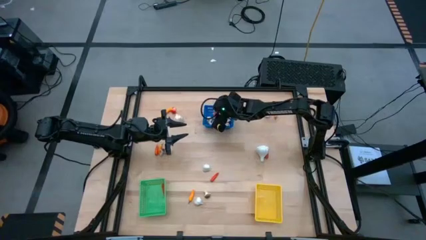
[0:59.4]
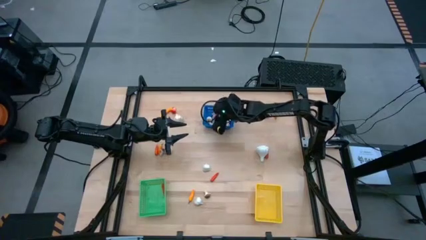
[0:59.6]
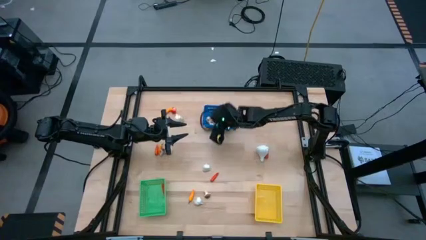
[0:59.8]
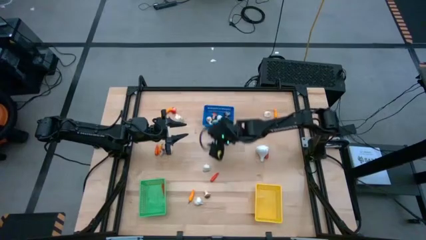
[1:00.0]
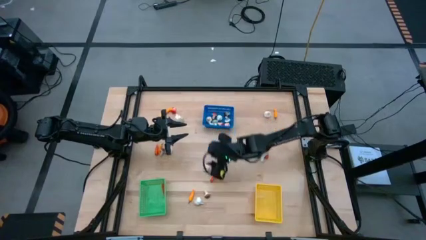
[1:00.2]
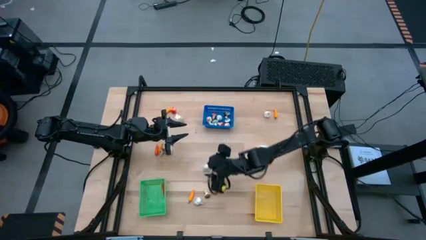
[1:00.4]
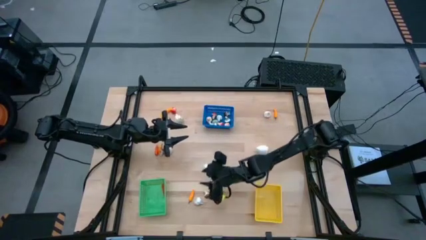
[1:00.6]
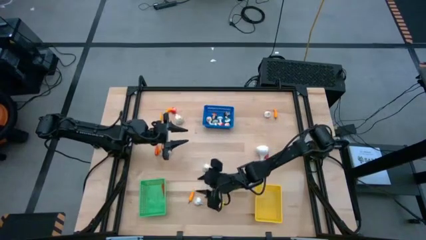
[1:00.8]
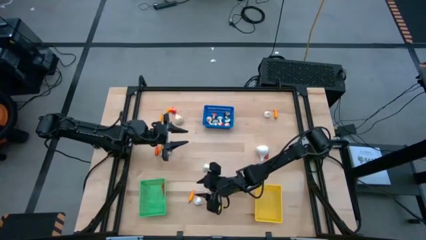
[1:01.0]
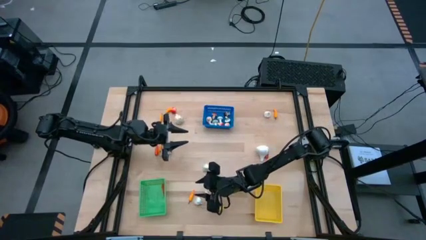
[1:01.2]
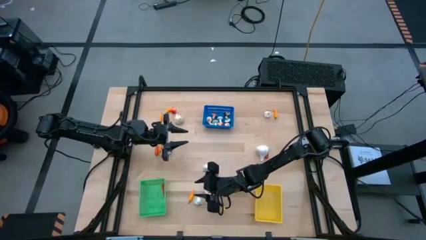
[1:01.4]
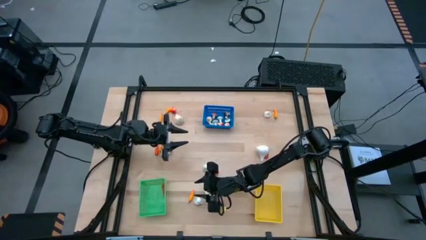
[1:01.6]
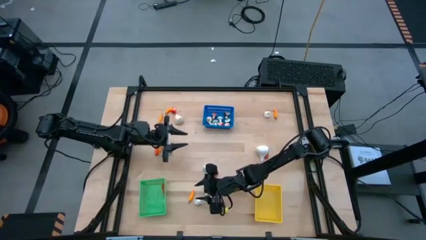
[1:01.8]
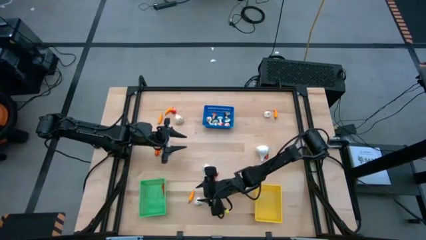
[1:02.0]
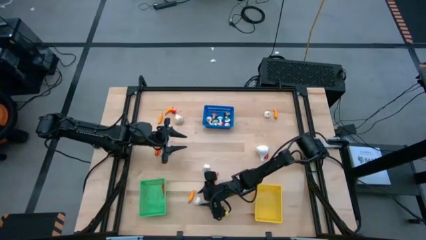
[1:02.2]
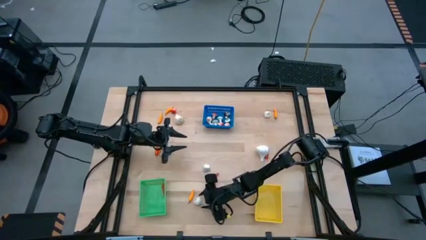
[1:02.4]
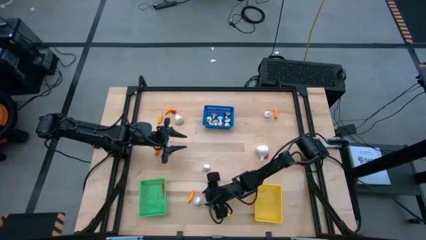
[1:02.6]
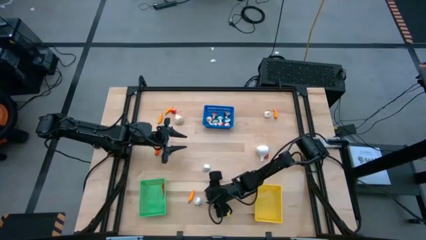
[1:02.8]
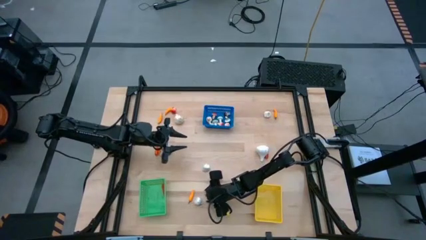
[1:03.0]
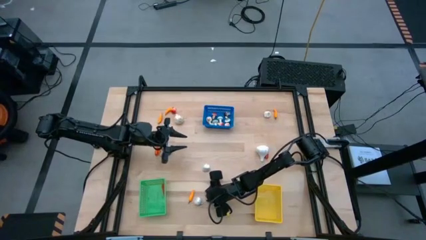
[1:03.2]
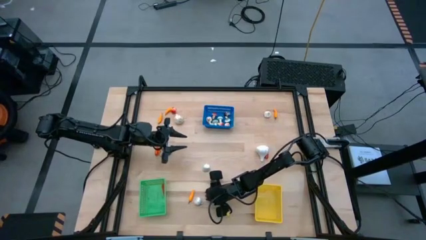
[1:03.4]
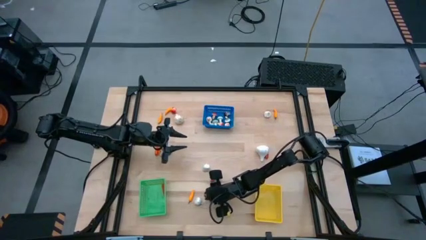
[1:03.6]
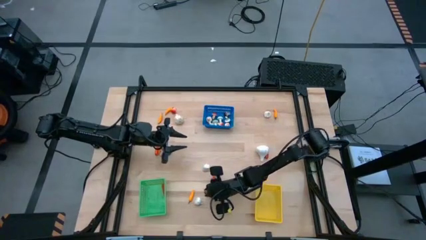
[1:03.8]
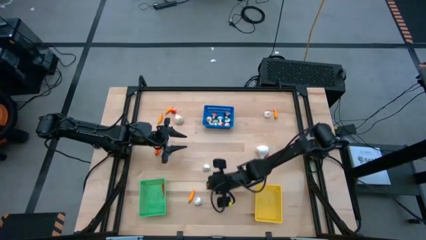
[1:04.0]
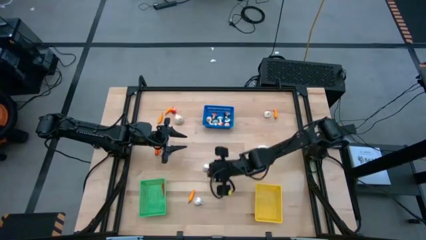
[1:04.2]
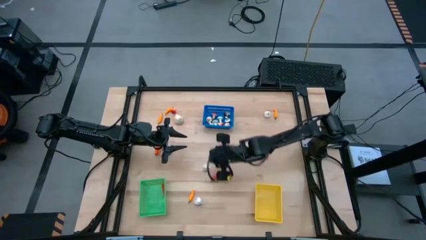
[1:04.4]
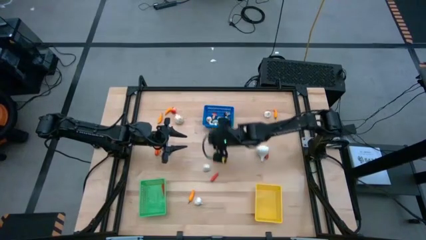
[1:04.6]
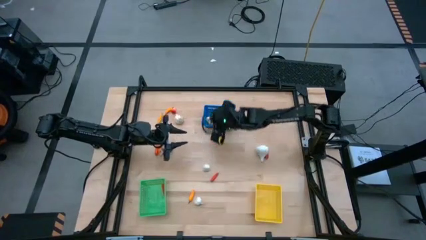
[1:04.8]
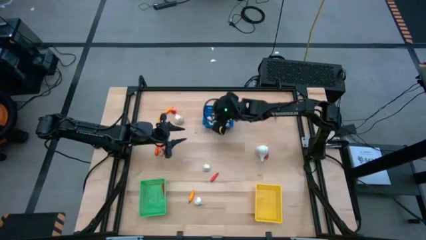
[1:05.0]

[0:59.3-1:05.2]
Task: Sort produce into baskets
Put then brown mushroom into the blue bin

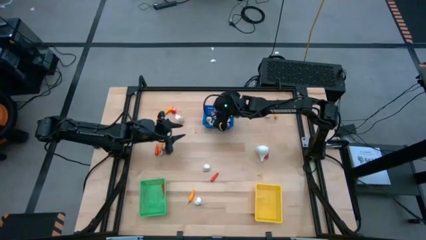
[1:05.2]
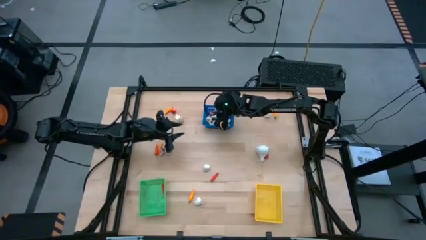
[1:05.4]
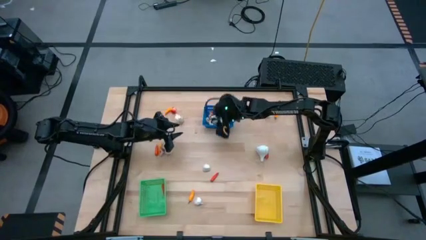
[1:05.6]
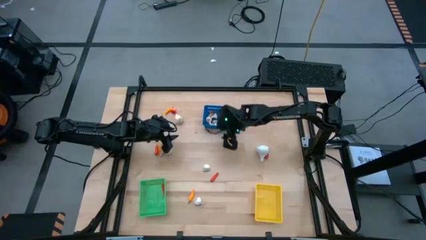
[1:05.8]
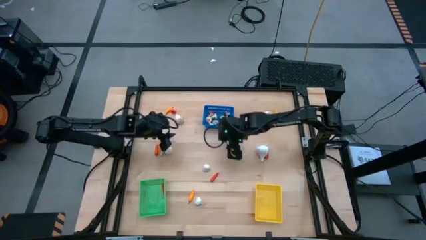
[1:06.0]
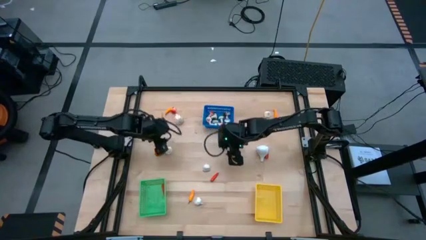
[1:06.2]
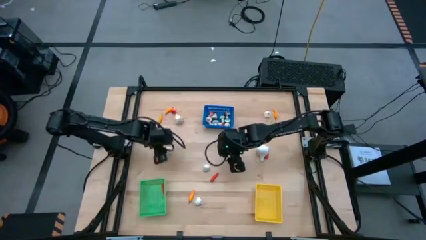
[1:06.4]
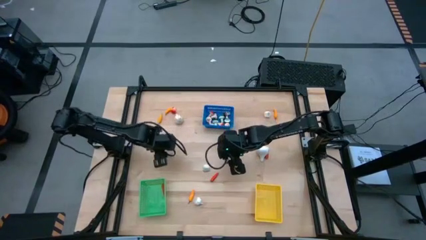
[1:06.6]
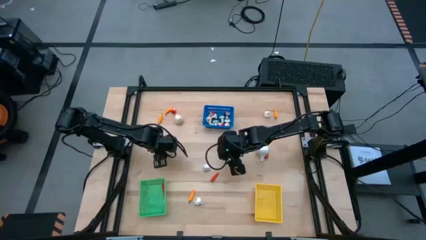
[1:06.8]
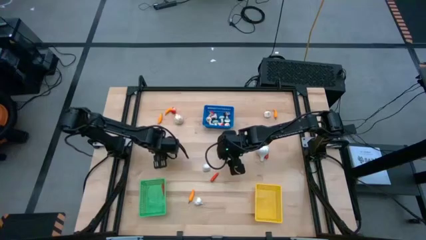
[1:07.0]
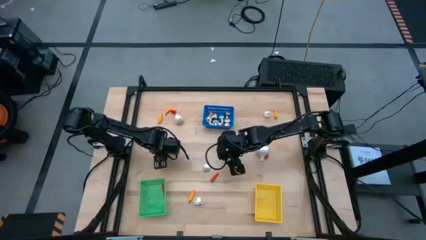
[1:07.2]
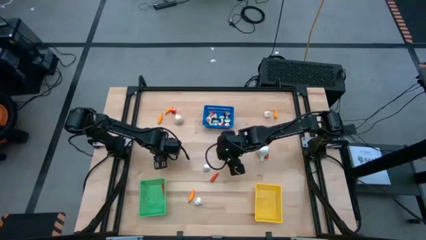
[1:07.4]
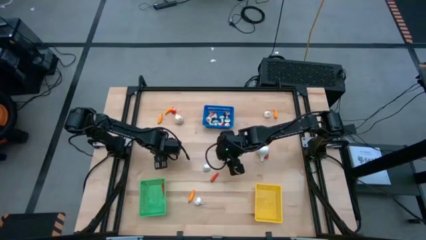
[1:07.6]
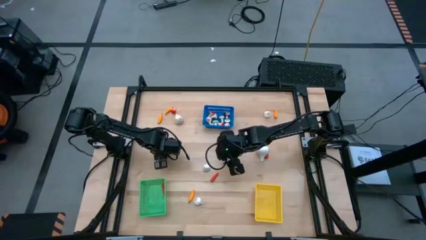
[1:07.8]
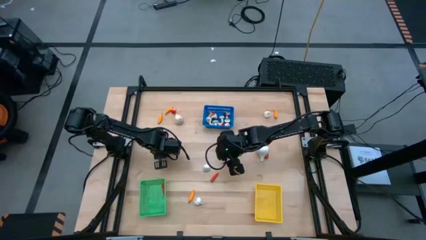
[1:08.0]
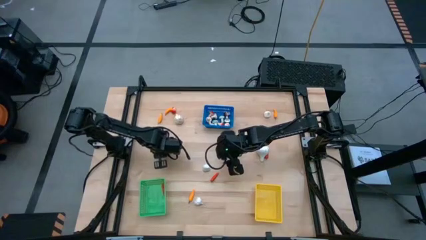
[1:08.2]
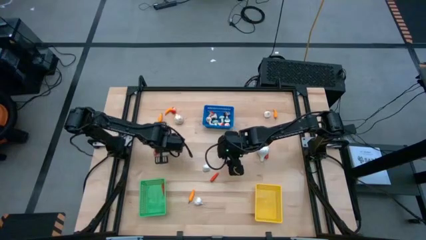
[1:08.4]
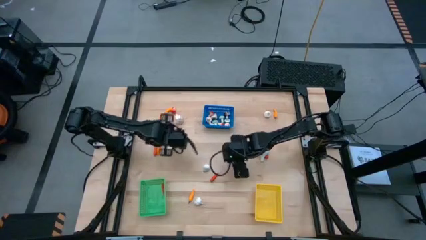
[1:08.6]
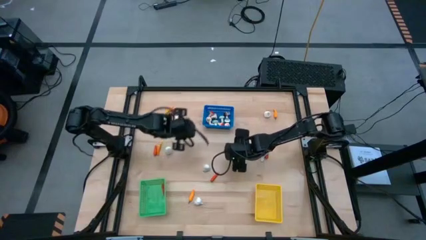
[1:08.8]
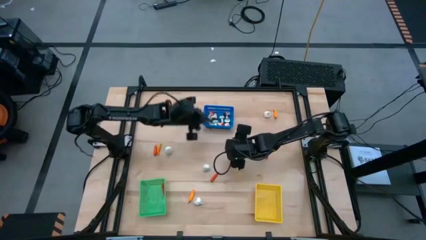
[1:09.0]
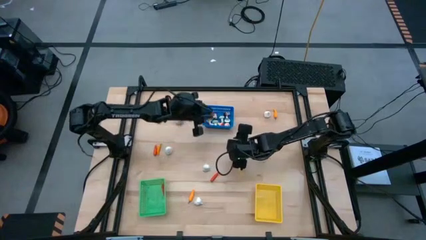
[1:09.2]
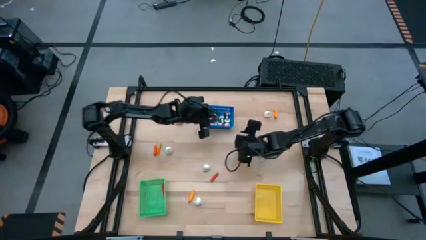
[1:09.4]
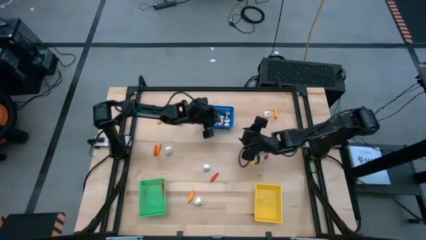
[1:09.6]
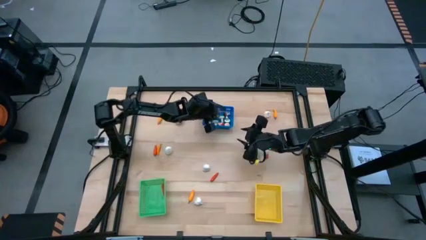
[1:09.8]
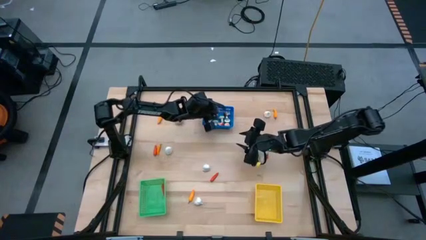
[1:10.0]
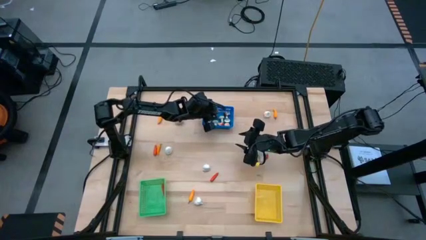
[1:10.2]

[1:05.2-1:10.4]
Put the brown mushroom into the blue bin

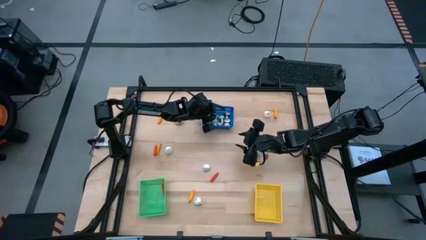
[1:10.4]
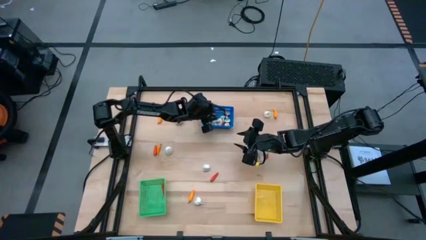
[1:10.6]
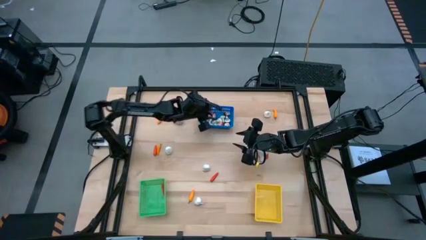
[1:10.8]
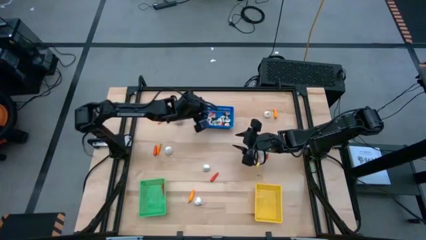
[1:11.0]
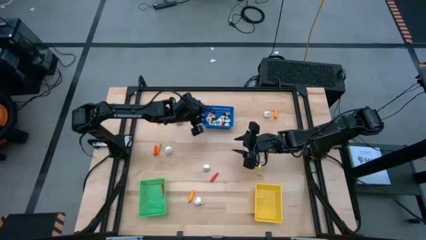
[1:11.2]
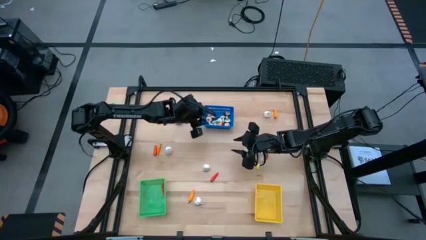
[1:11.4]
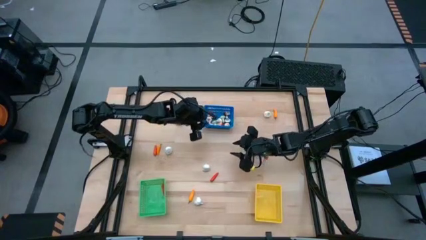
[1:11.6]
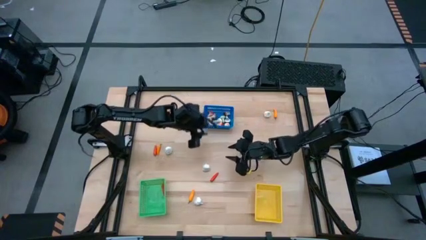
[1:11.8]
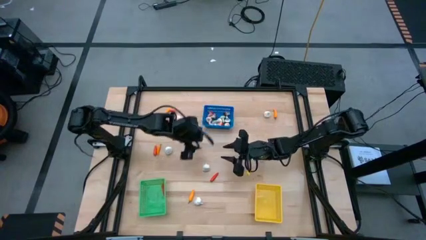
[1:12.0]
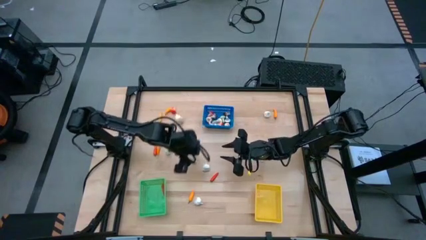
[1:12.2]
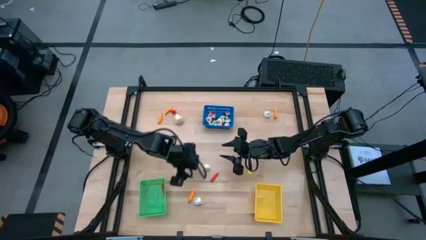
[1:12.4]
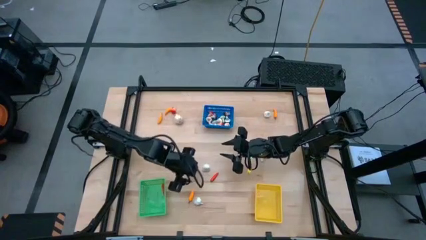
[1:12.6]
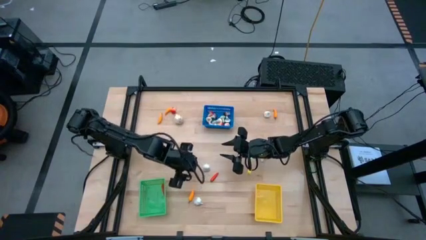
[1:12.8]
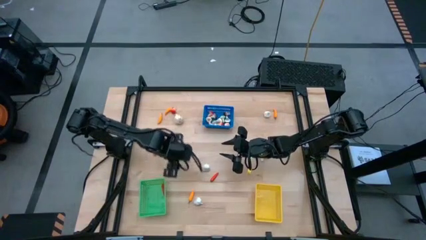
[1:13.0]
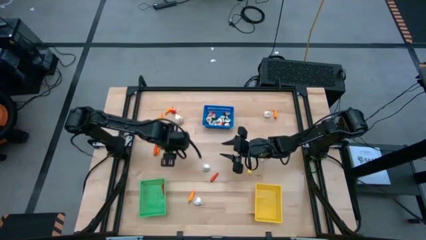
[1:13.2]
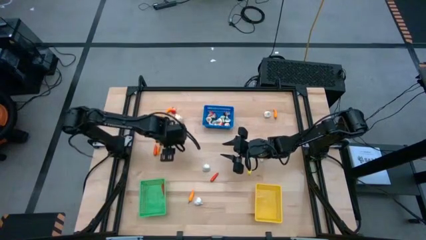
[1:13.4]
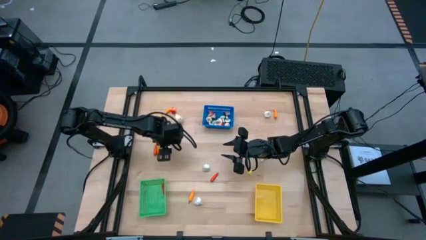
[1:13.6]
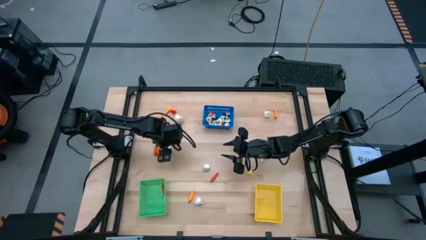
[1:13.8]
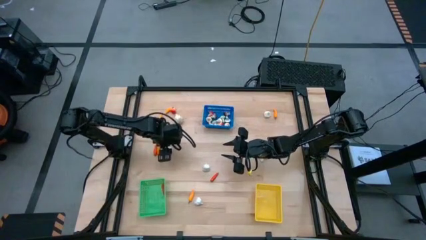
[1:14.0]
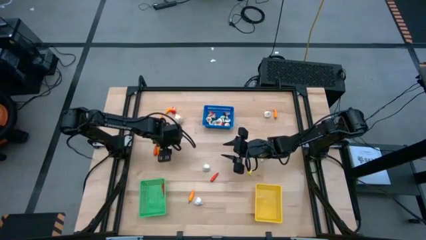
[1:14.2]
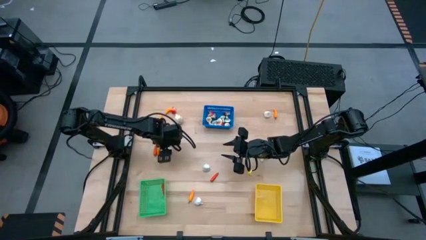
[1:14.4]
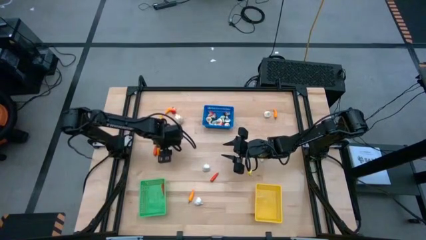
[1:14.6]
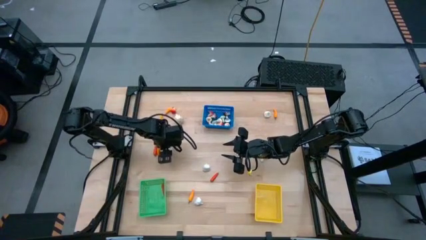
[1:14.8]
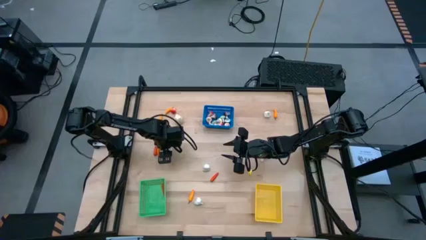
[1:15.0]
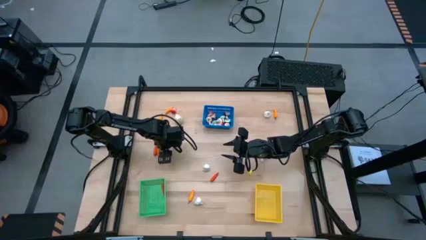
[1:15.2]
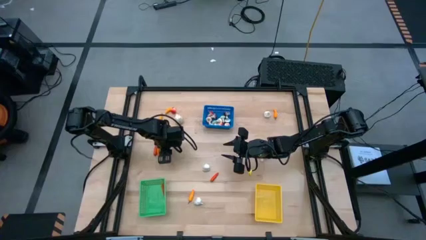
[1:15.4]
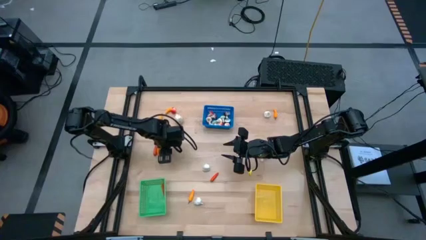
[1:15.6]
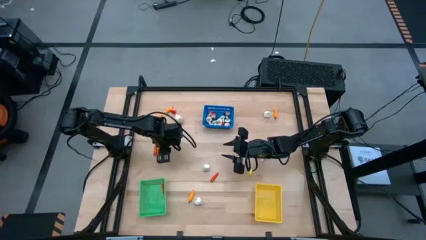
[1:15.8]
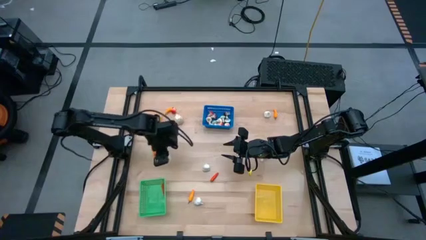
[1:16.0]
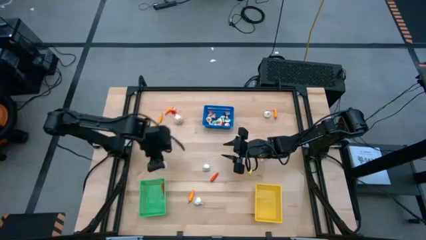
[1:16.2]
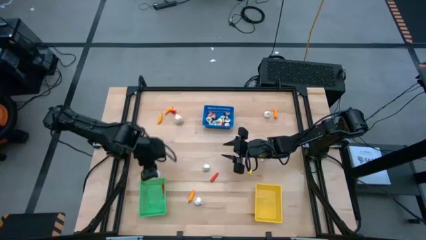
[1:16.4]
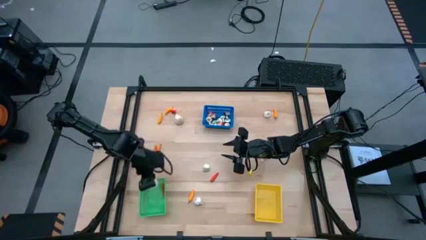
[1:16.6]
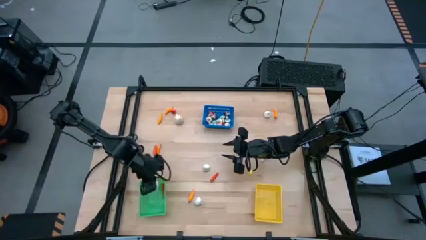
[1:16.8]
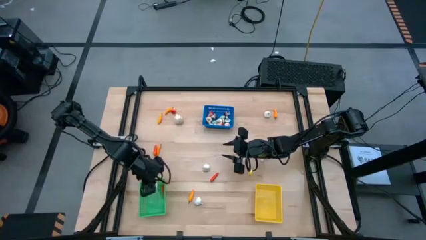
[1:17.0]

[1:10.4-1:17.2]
Put the white garlic into the green bin
